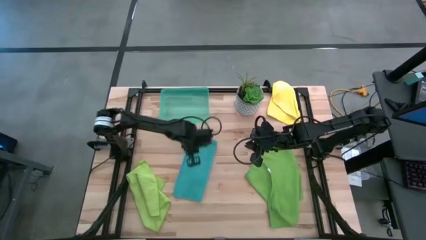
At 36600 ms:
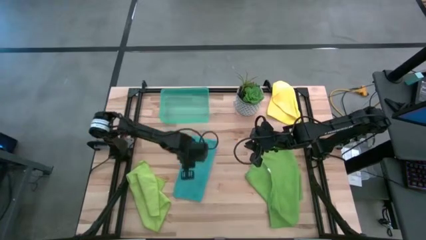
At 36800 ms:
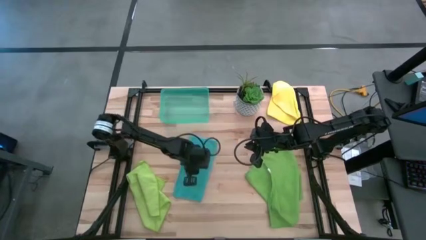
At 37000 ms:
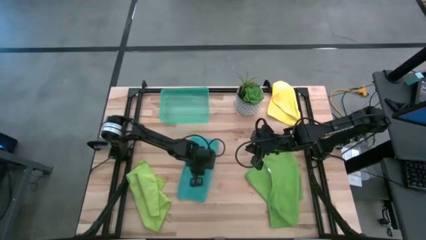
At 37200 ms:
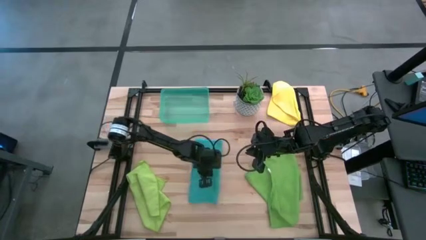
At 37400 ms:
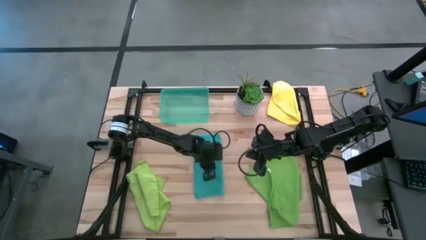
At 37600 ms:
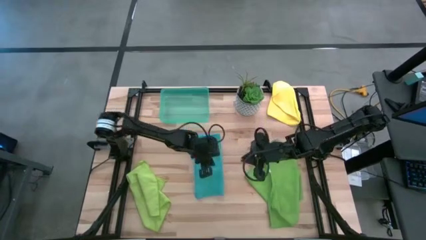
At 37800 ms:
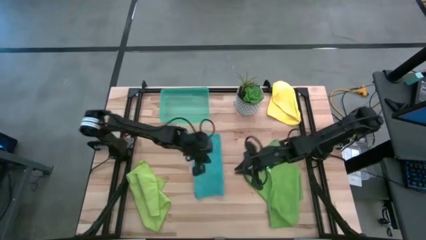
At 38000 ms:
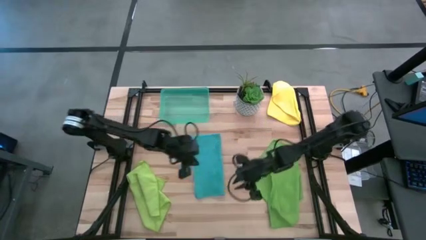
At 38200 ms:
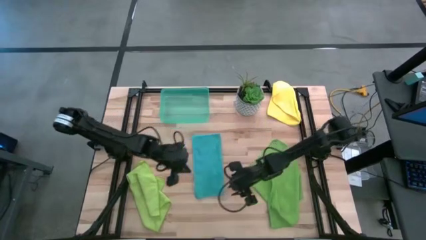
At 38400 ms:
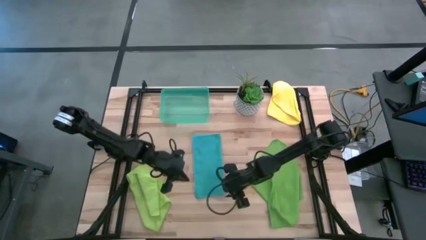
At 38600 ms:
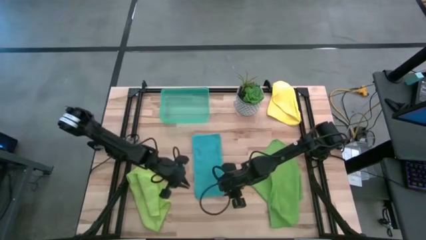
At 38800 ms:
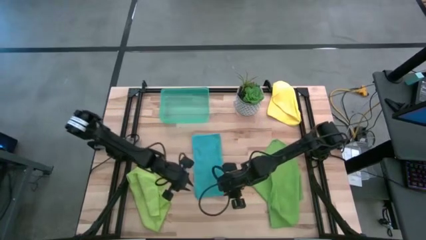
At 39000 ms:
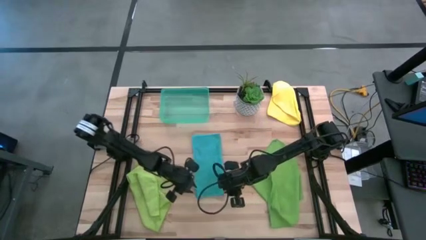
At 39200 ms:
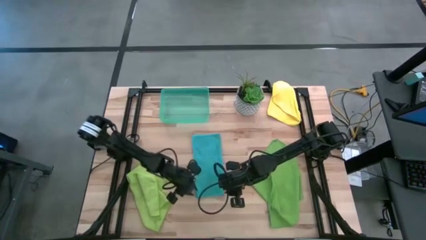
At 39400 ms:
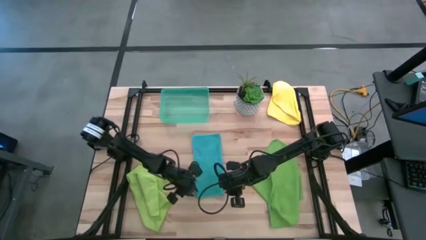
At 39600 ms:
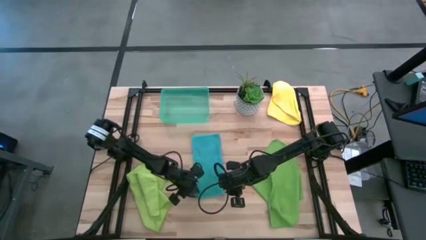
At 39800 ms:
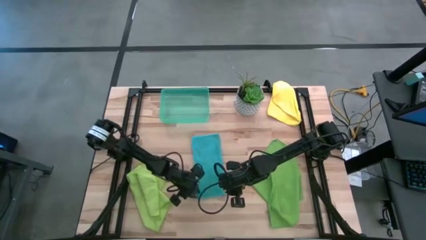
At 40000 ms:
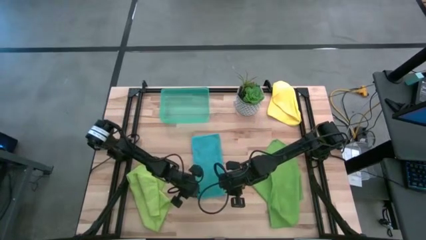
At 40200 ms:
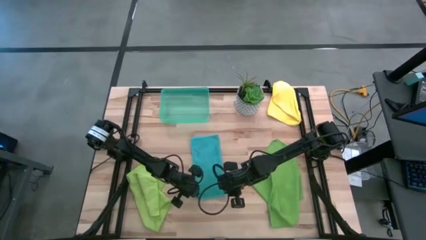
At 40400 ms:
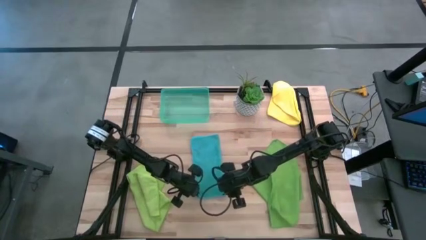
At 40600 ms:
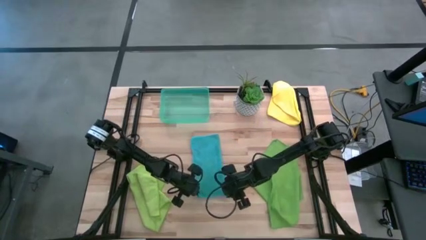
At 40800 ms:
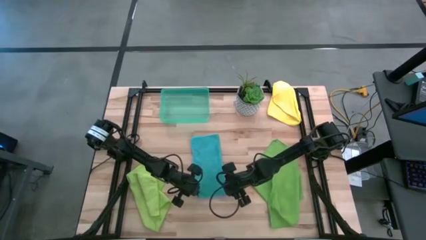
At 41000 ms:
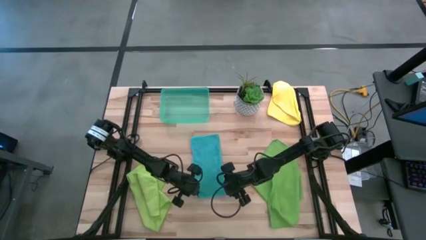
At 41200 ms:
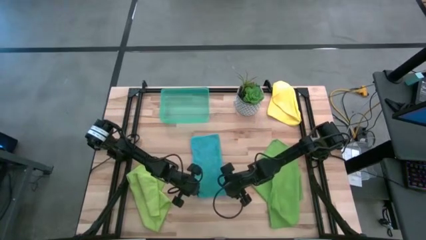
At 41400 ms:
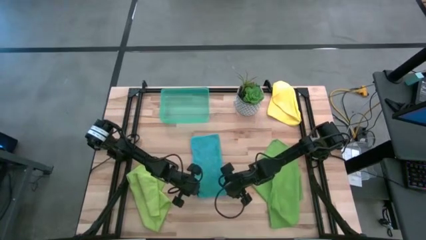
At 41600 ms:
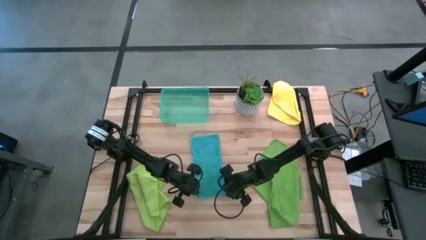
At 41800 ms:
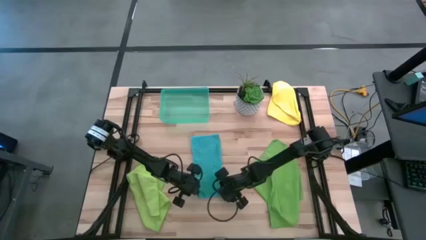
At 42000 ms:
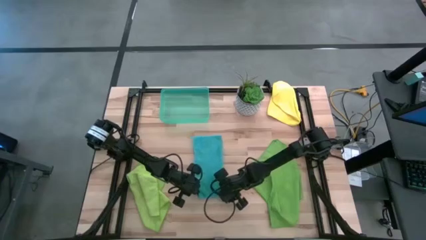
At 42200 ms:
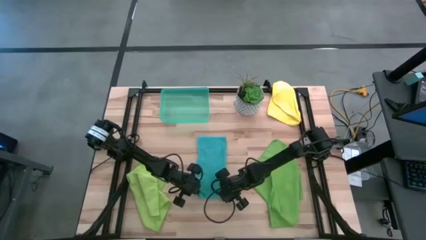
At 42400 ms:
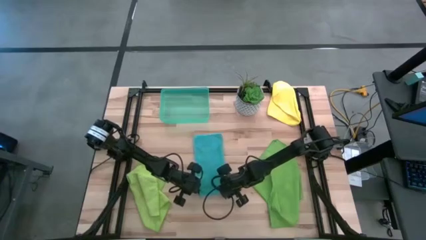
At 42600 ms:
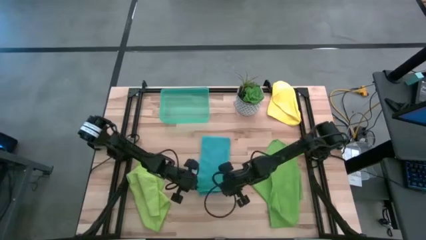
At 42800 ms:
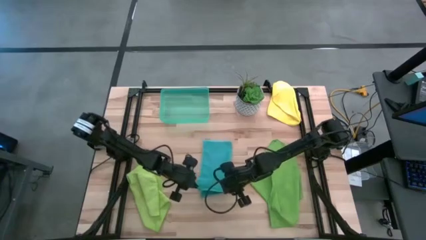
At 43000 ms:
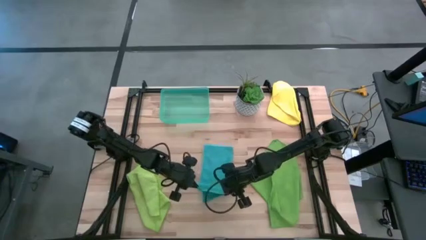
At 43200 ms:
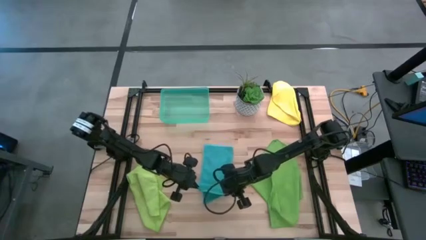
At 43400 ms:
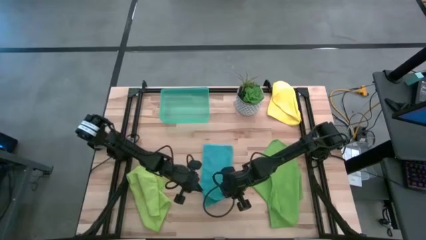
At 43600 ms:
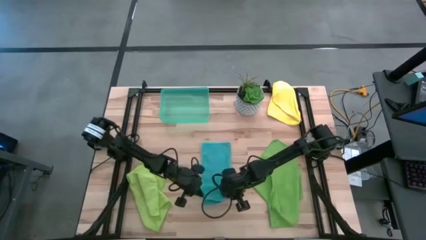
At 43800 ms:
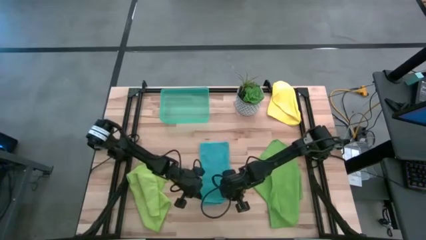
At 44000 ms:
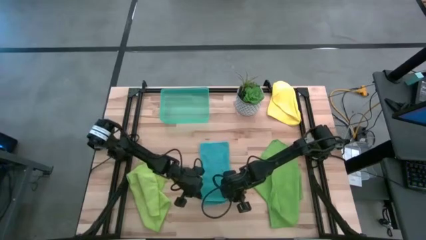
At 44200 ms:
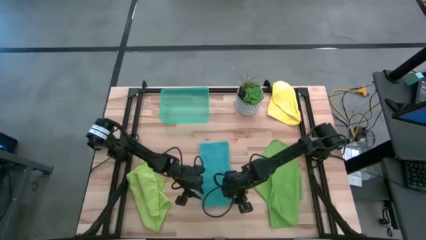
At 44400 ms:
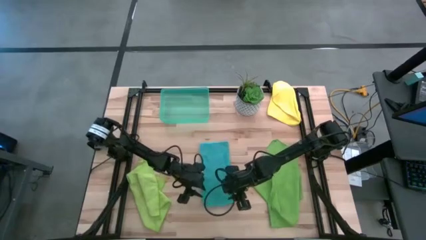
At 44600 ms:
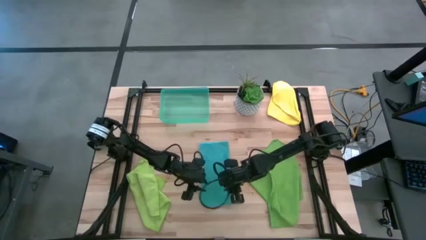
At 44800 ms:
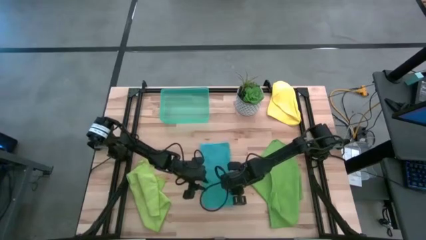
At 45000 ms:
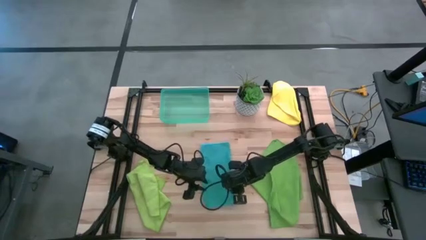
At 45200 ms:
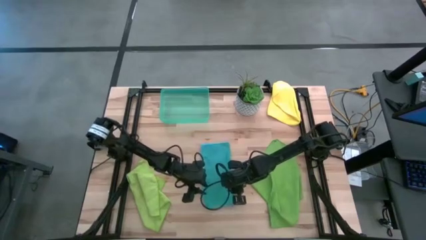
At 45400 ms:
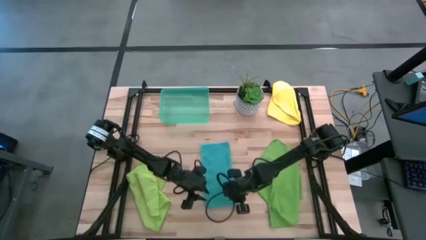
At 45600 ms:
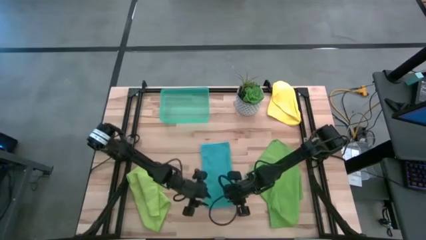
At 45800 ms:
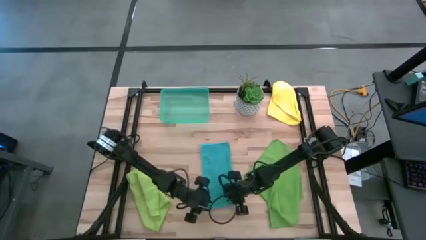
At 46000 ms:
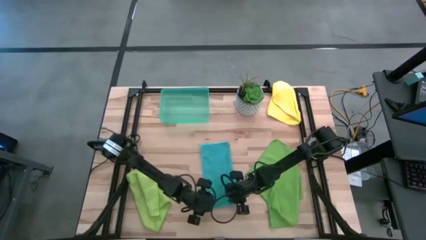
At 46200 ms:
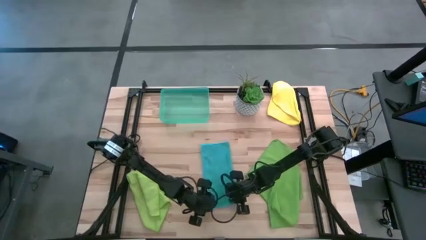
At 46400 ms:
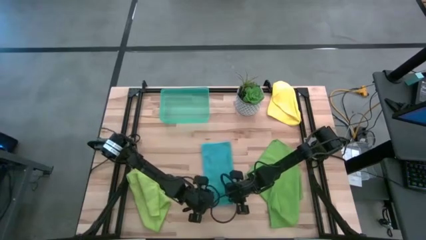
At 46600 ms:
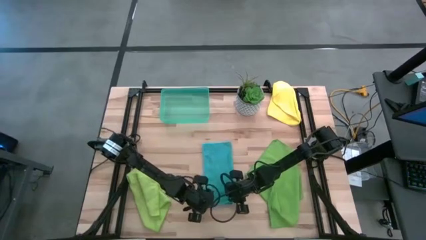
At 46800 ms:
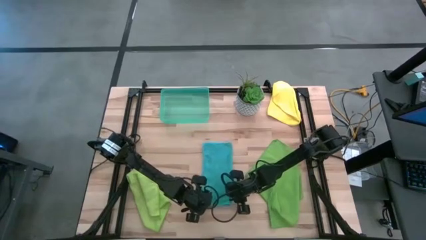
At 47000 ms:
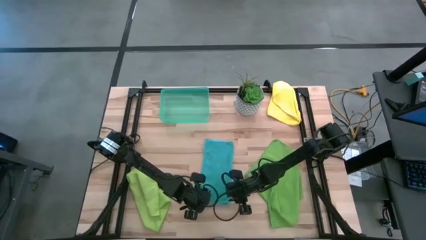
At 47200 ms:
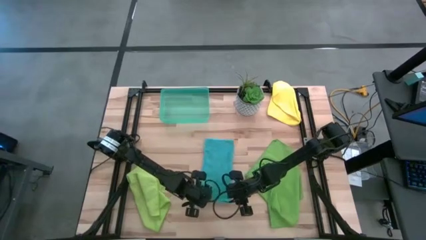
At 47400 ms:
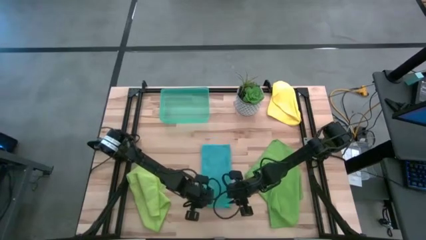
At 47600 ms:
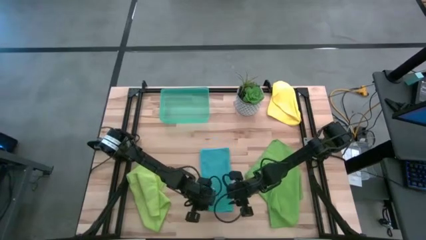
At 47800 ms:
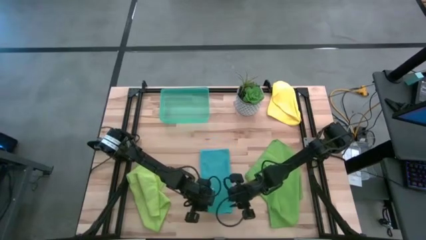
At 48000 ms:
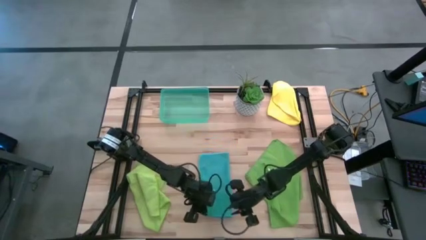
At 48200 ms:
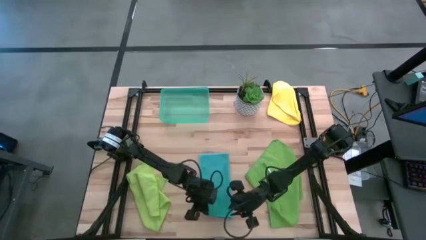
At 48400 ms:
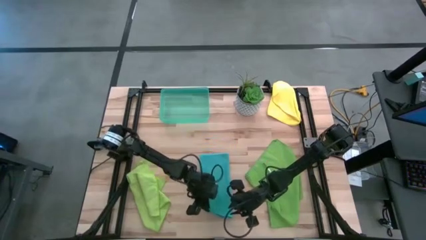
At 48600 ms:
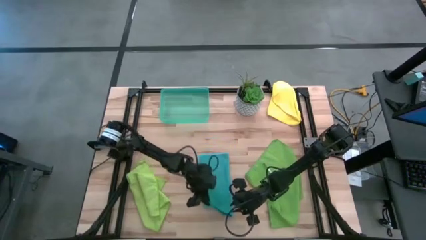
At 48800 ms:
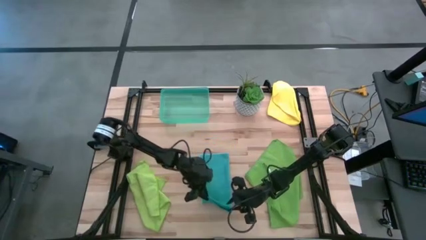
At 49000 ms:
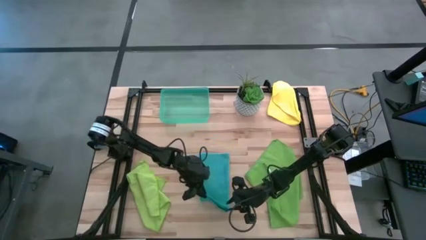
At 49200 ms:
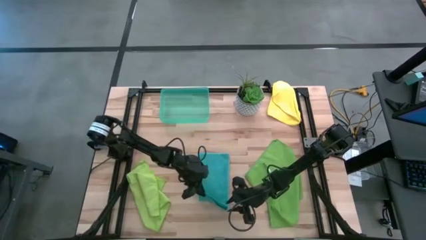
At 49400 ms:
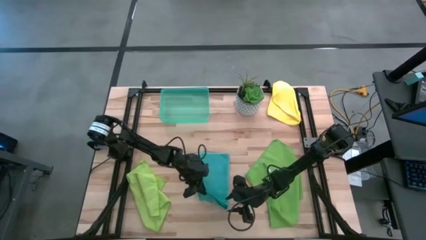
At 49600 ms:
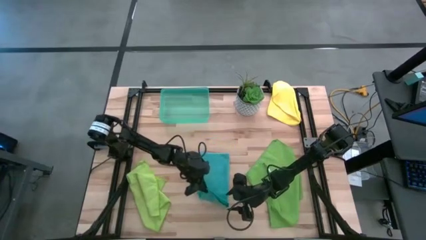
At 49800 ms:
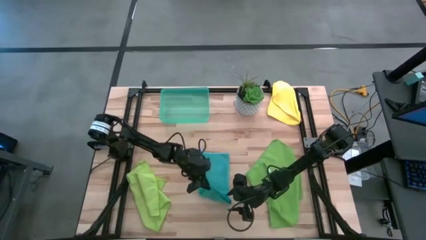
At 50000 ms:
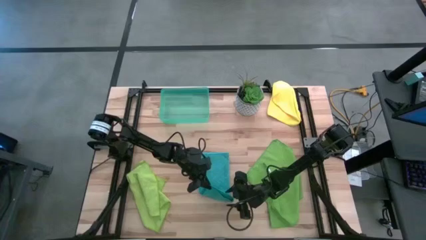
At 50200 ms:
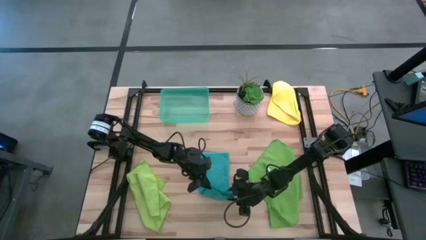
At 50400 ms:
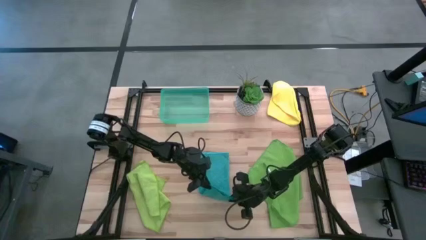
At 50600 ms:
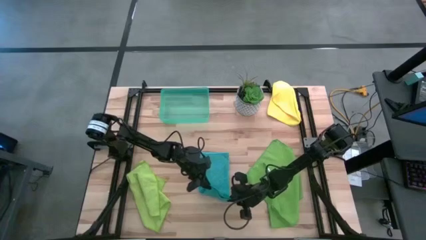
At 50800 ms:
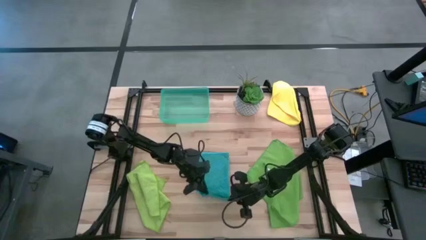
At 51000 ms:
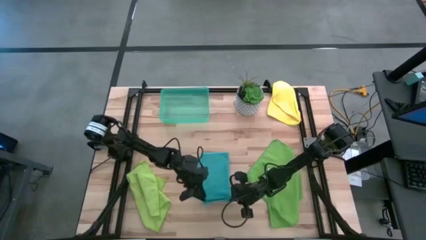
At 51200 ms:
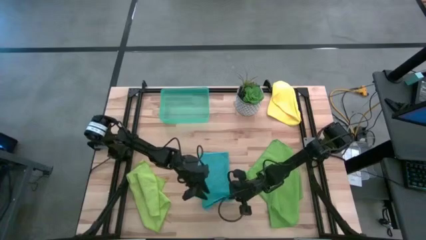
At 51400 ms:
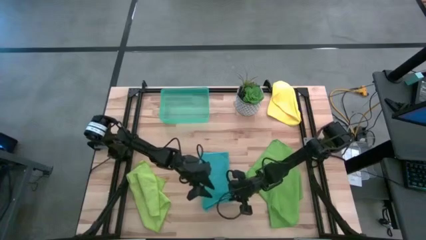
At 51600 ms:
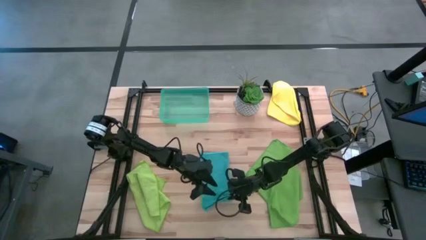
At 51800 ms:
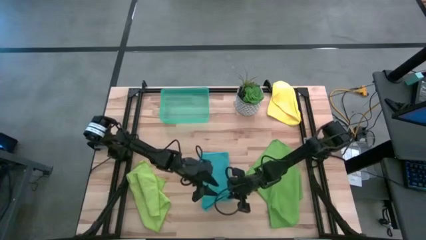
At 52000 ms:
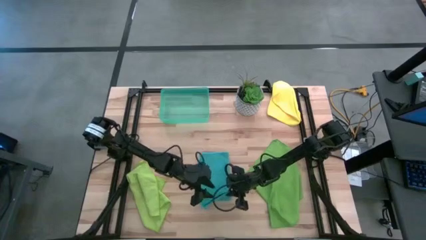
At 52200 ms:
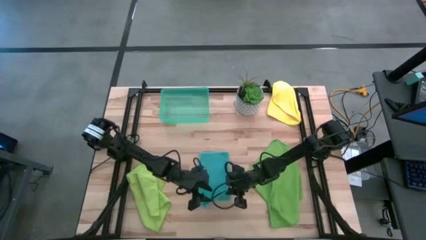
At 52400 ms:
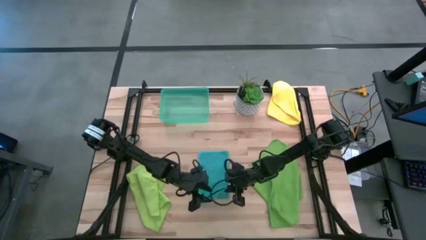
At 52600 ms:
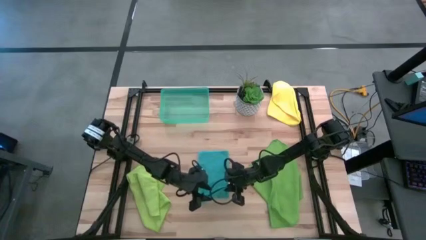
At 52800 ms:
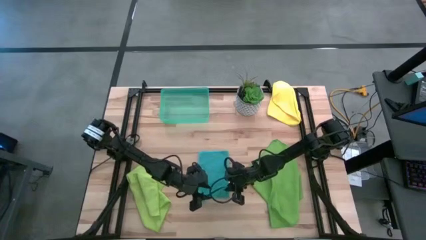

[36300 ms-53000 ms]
Task: Fold microfiber towels
Fold the blue microfiber cloth
